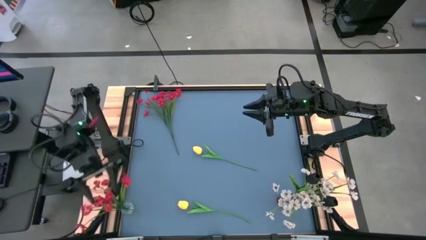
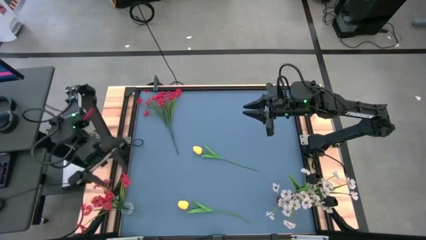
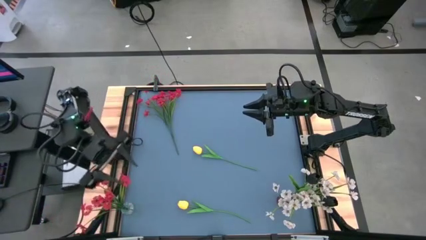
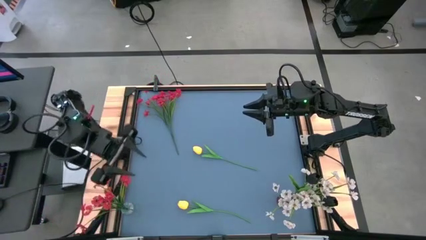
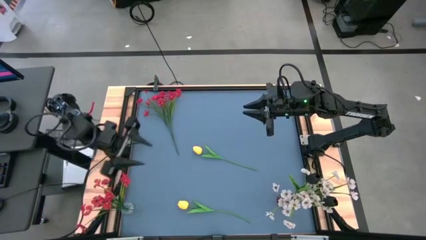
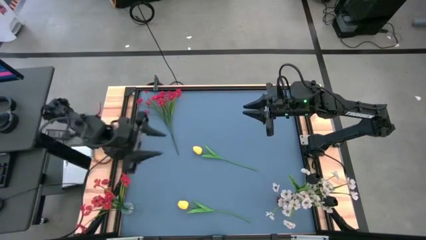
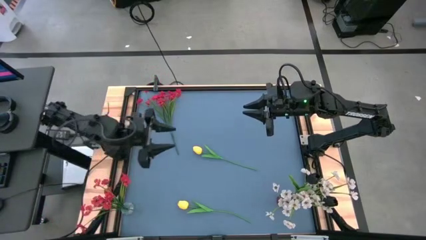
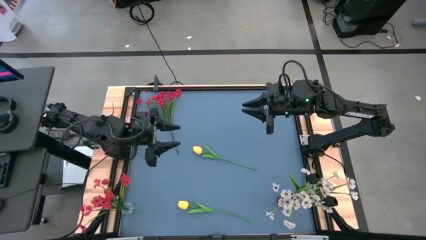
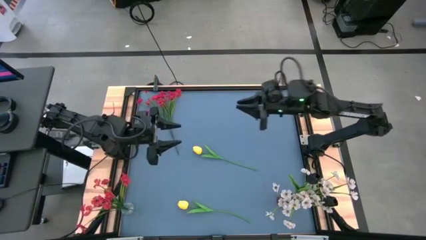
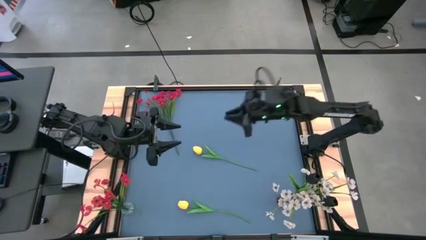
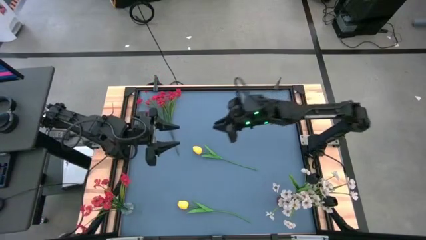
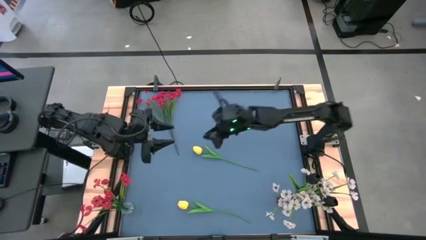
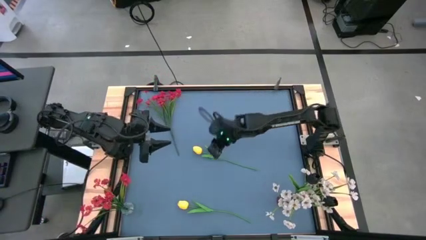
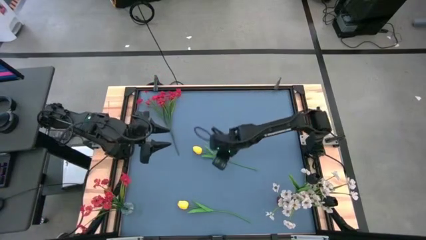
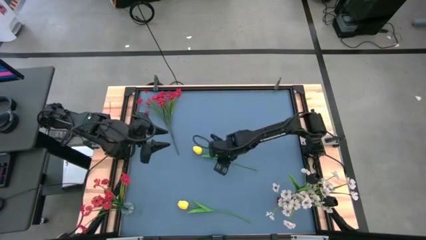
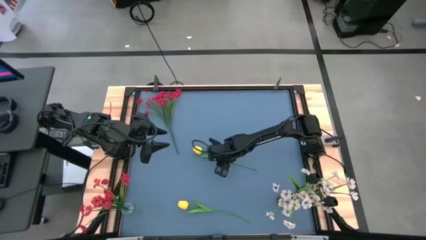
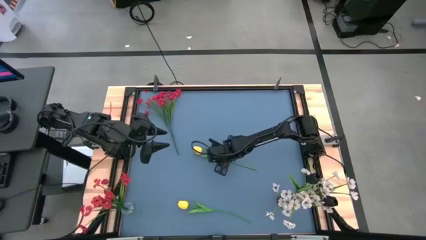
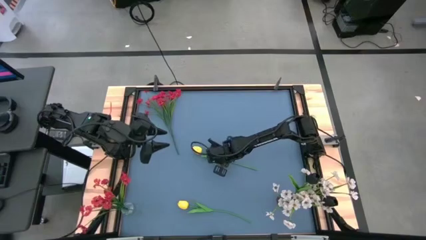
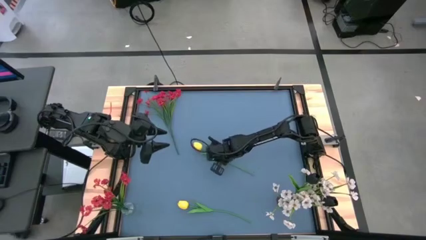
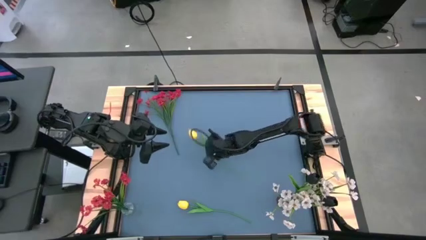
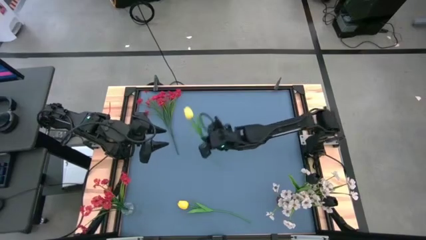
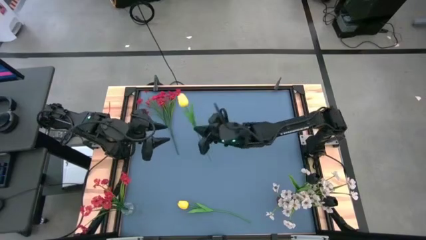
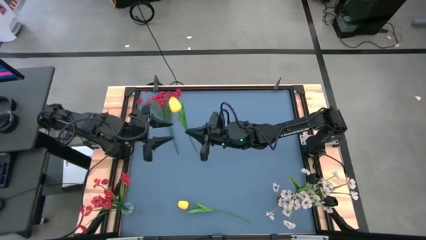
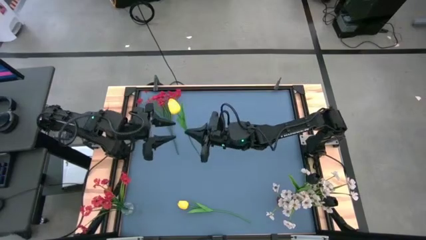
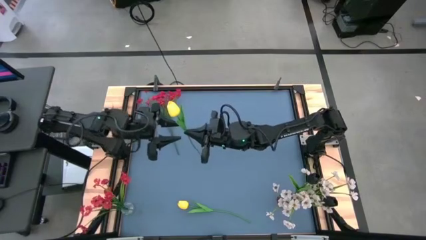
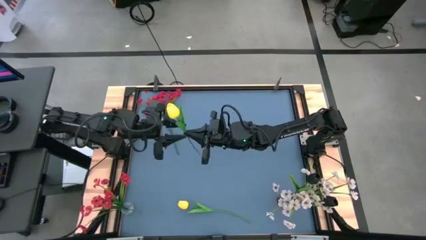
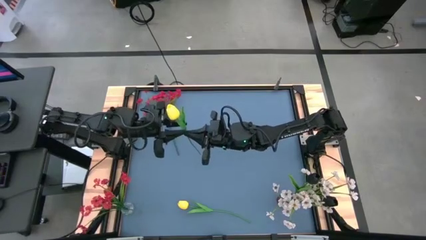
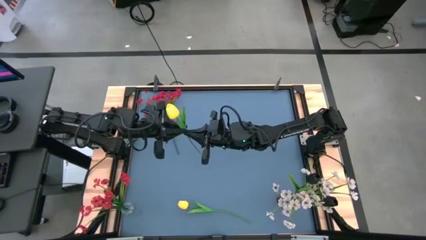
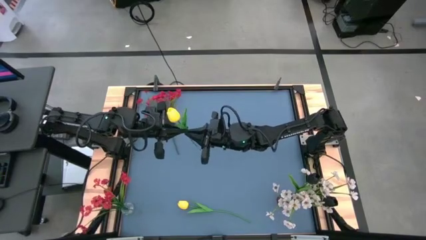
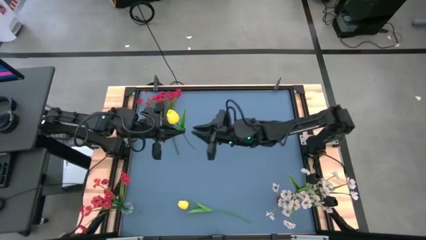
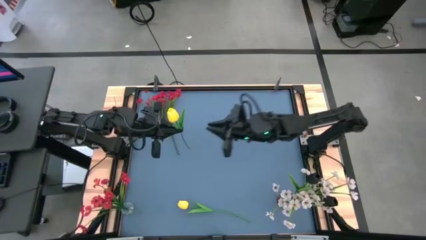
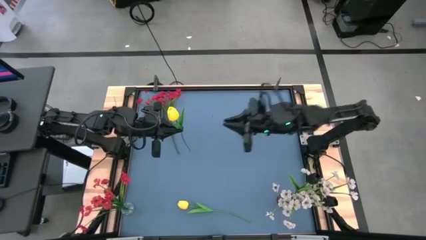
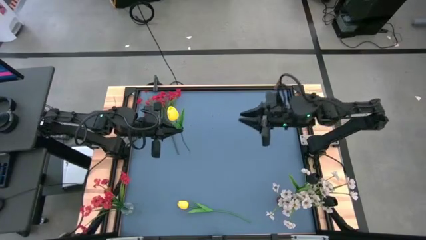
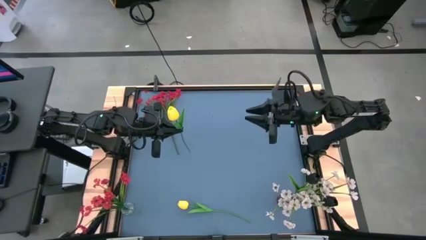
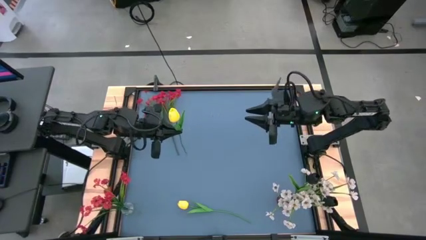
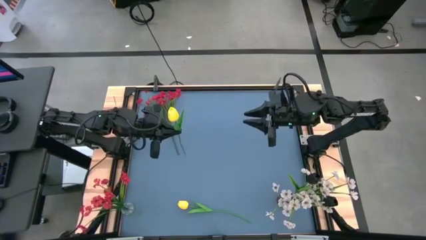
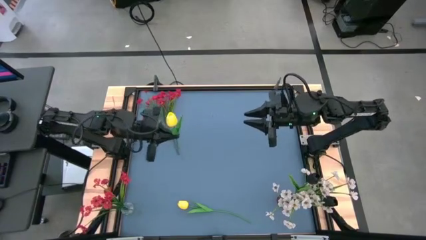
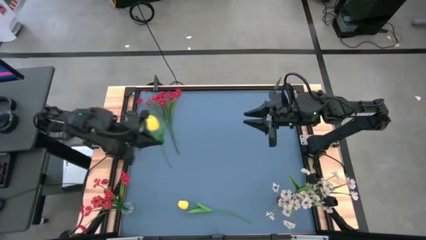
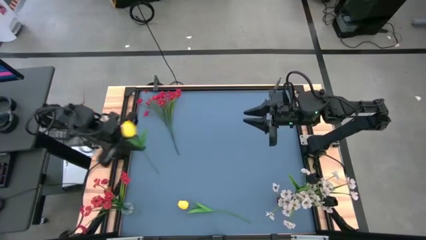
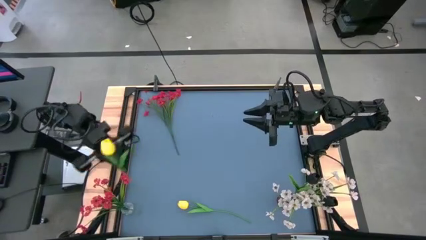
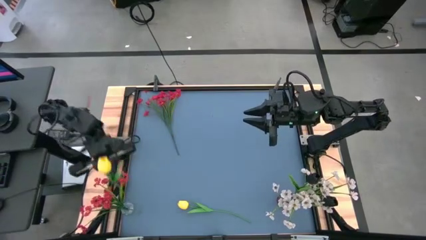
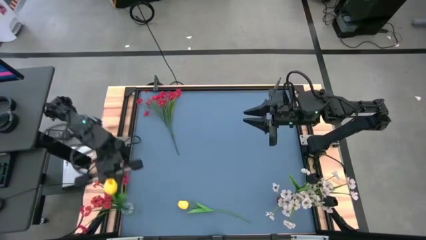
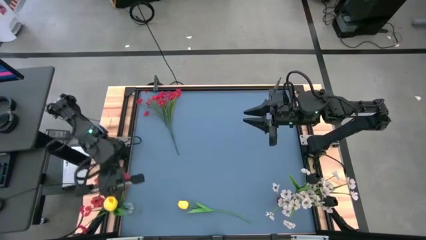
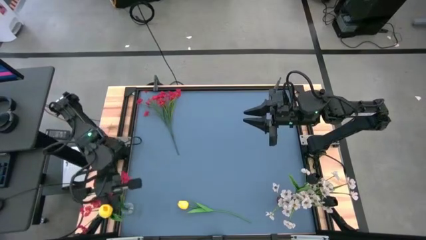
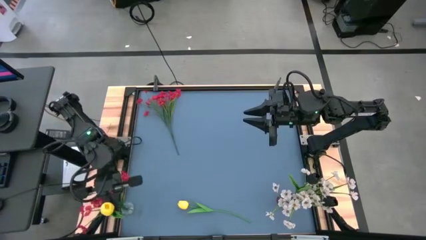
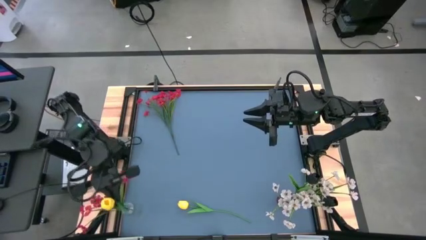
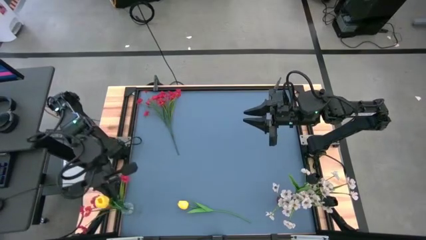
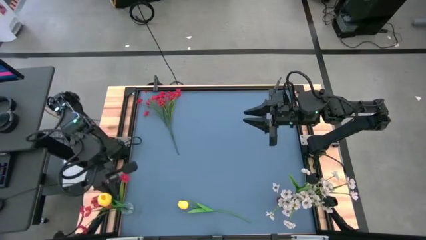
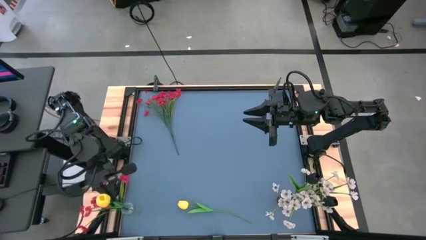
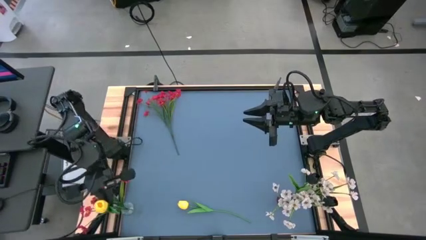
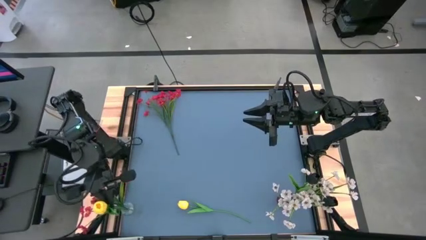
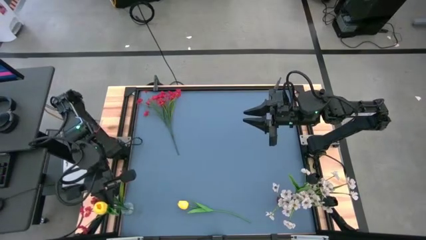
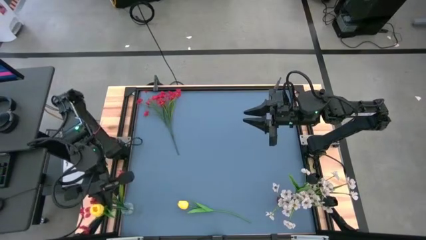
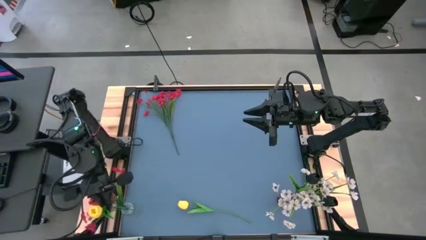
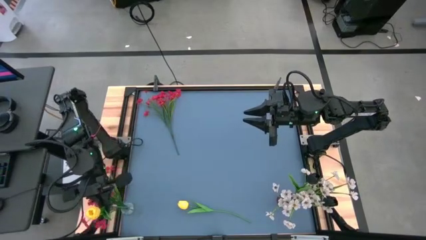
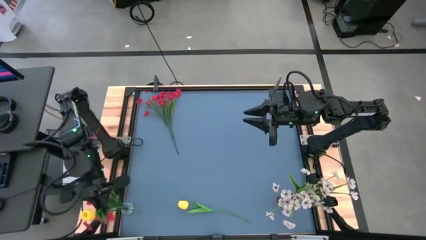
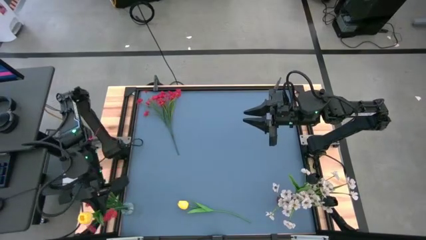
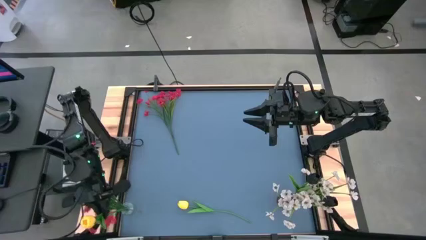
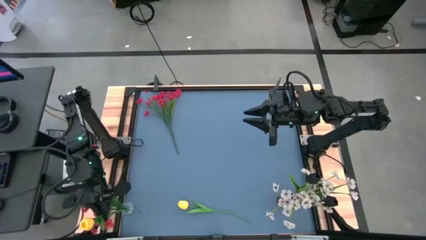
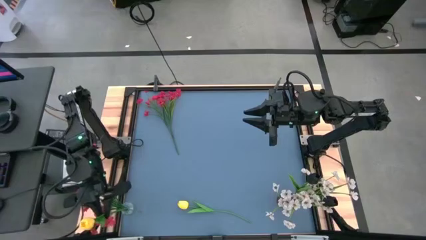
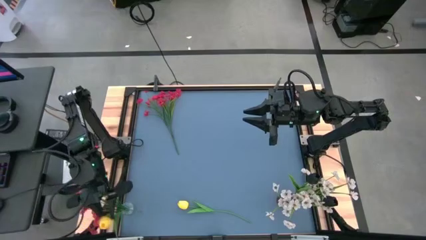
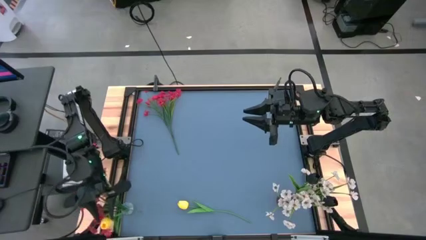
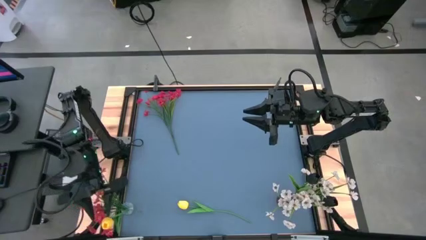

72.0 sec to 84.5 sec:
Task: Sort flowers into vase by color
Put the top yellow tulip into the transparent vase
